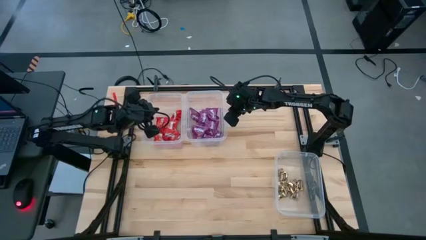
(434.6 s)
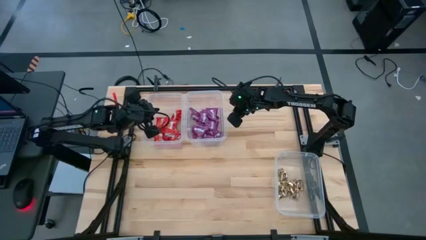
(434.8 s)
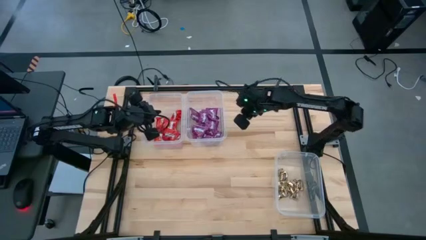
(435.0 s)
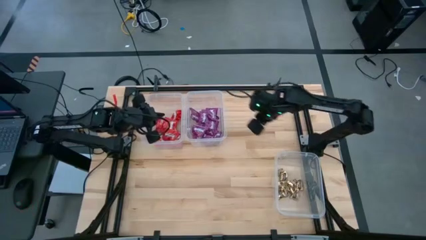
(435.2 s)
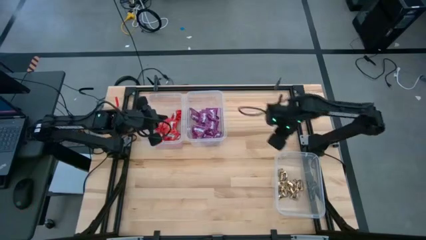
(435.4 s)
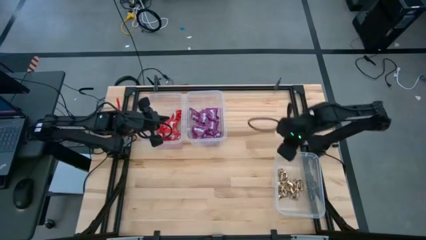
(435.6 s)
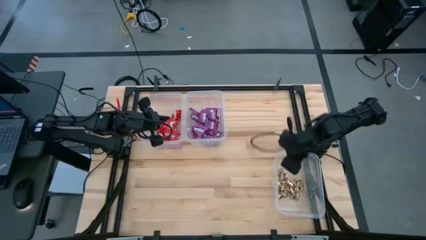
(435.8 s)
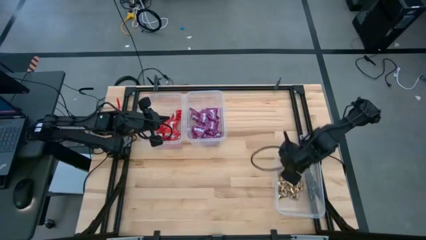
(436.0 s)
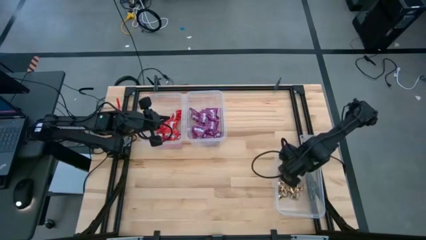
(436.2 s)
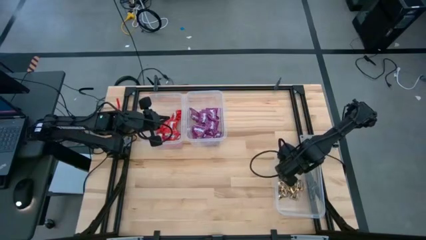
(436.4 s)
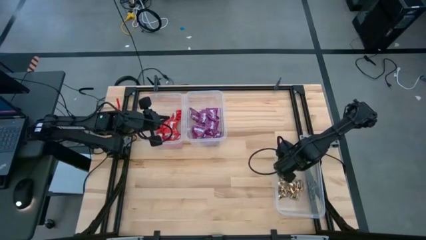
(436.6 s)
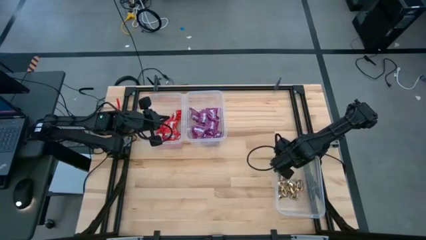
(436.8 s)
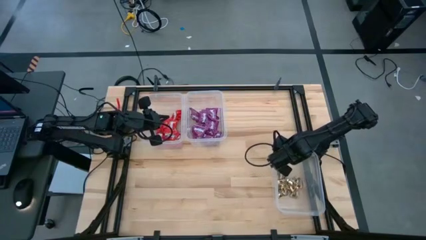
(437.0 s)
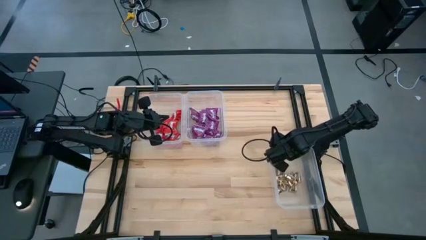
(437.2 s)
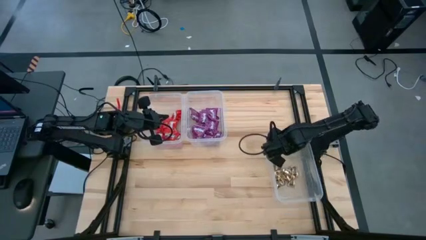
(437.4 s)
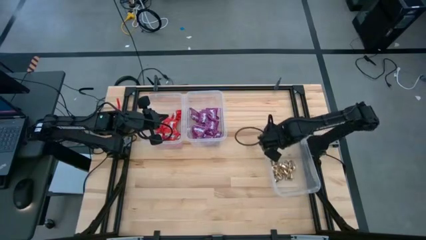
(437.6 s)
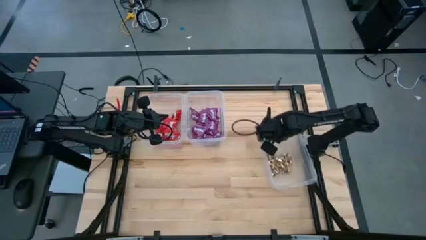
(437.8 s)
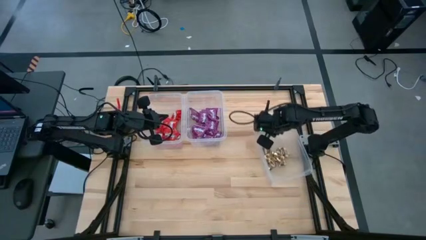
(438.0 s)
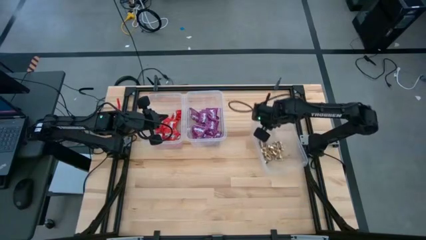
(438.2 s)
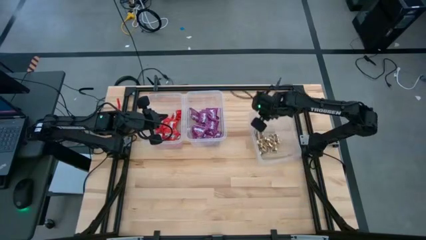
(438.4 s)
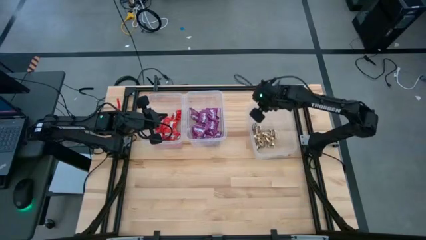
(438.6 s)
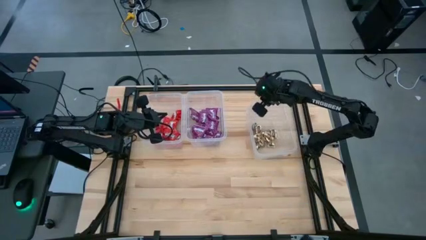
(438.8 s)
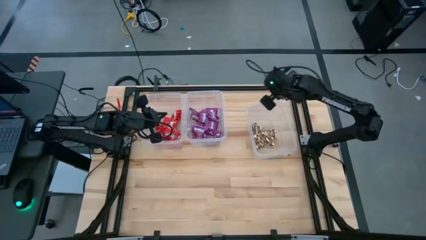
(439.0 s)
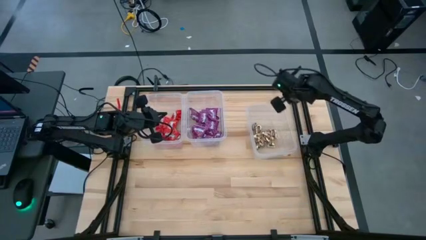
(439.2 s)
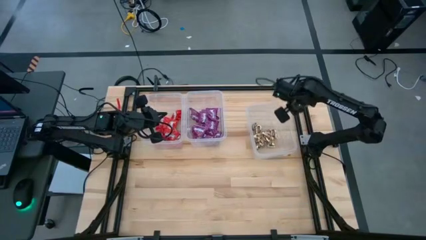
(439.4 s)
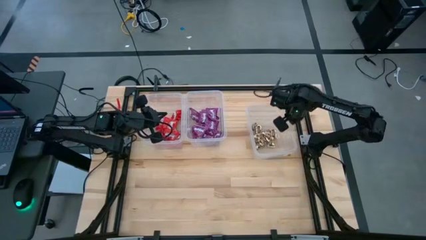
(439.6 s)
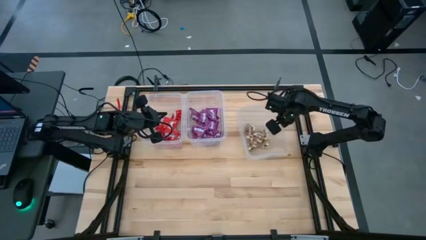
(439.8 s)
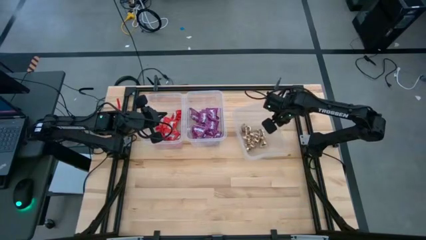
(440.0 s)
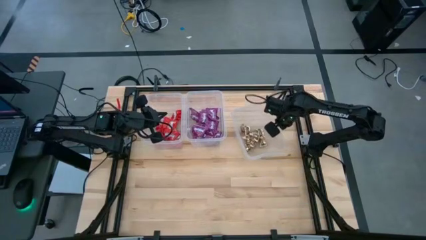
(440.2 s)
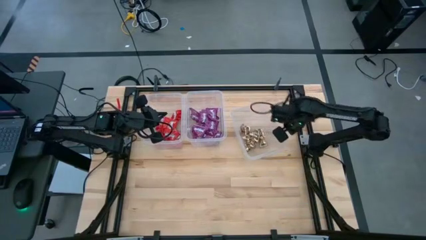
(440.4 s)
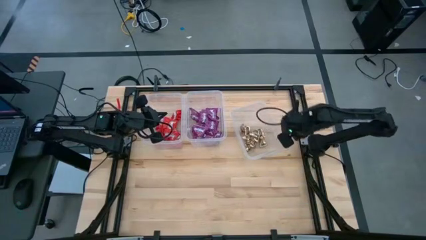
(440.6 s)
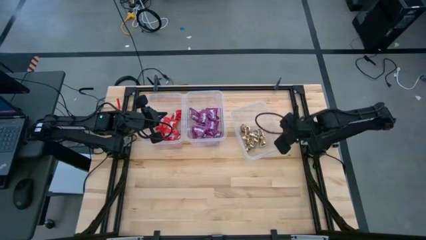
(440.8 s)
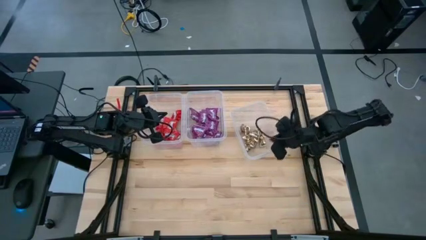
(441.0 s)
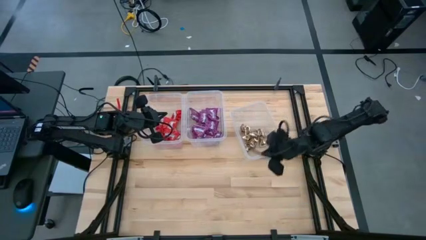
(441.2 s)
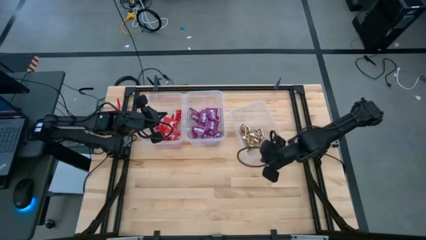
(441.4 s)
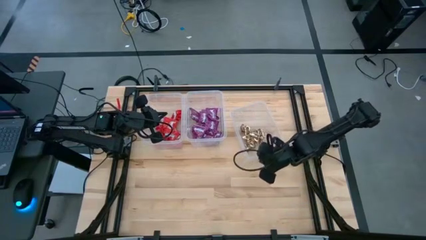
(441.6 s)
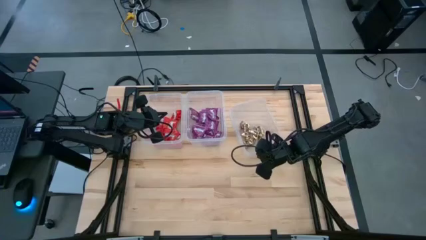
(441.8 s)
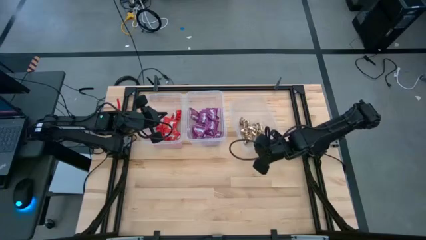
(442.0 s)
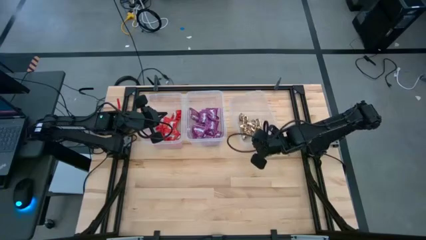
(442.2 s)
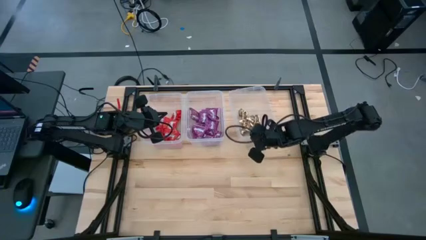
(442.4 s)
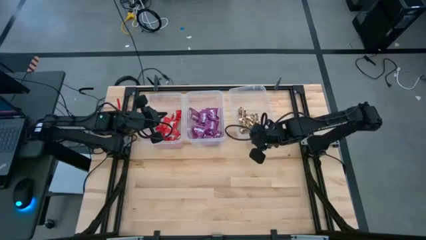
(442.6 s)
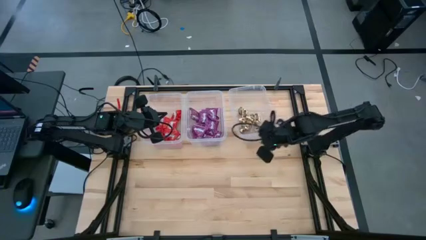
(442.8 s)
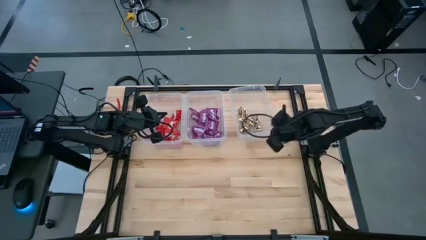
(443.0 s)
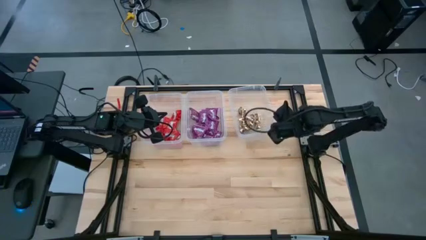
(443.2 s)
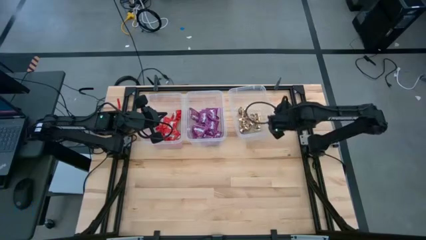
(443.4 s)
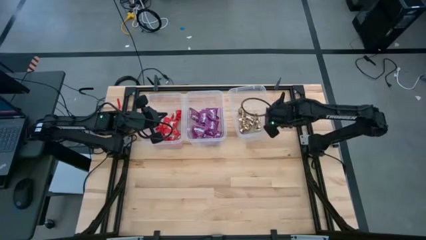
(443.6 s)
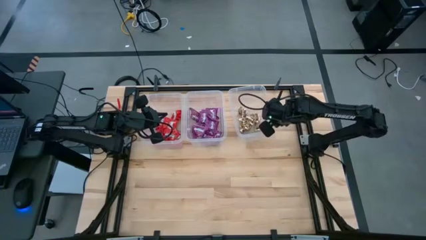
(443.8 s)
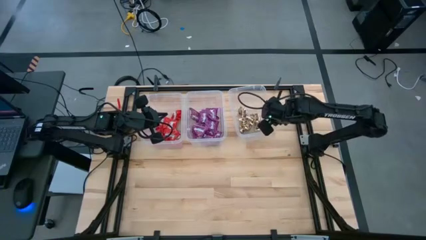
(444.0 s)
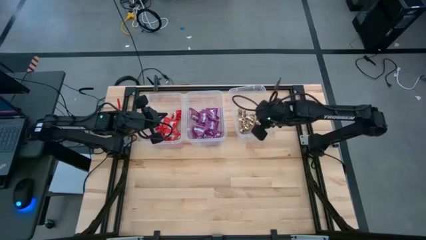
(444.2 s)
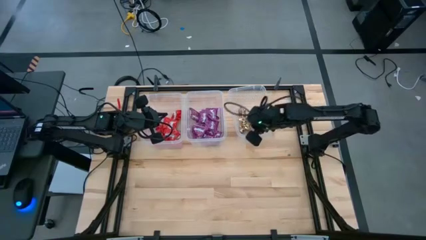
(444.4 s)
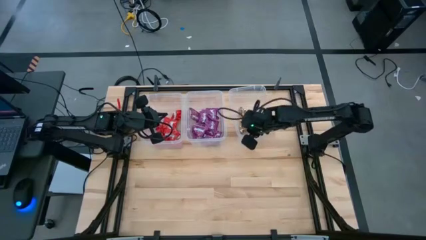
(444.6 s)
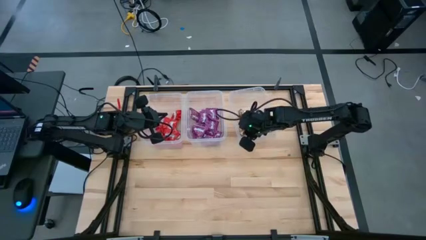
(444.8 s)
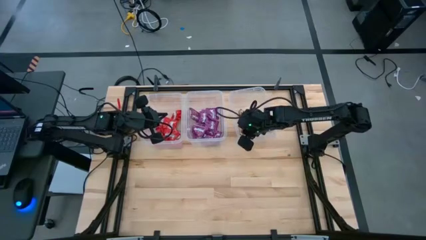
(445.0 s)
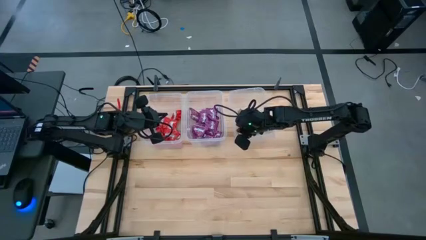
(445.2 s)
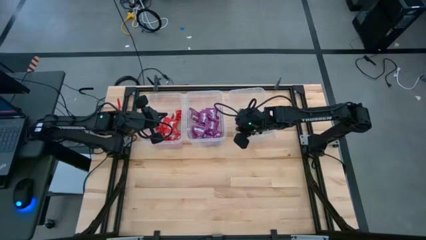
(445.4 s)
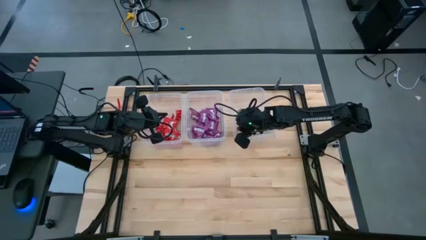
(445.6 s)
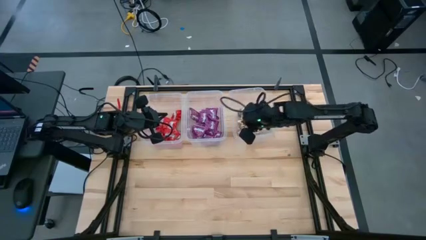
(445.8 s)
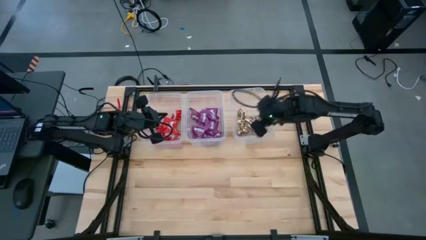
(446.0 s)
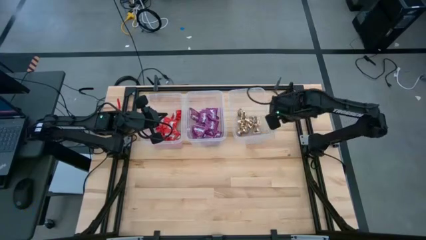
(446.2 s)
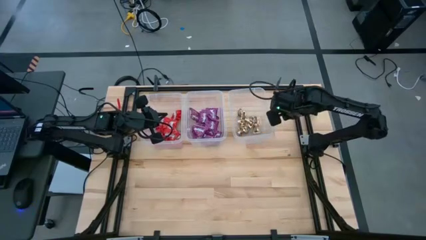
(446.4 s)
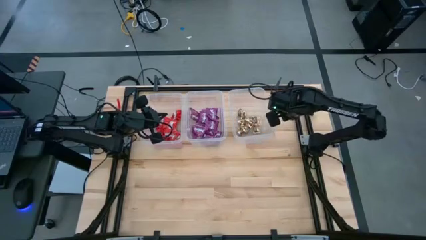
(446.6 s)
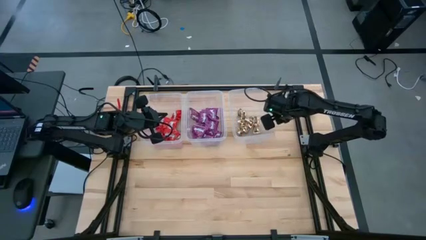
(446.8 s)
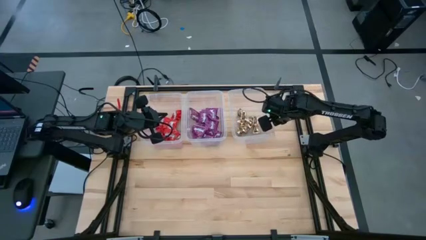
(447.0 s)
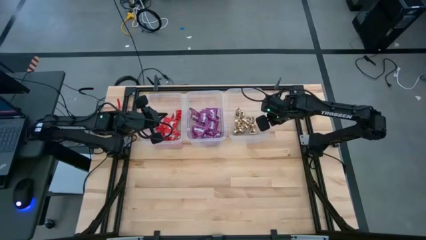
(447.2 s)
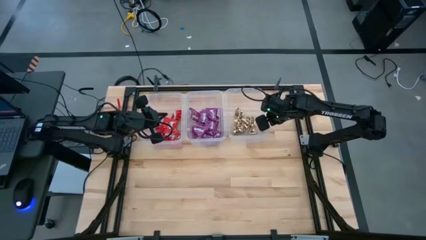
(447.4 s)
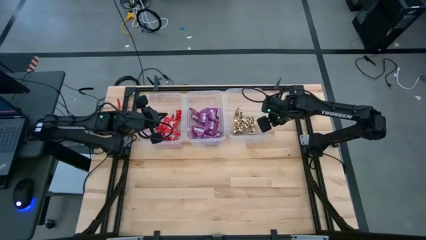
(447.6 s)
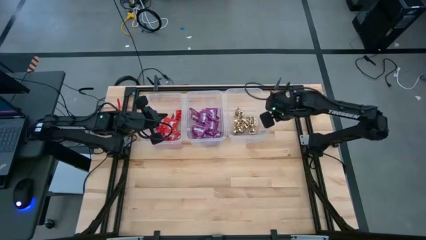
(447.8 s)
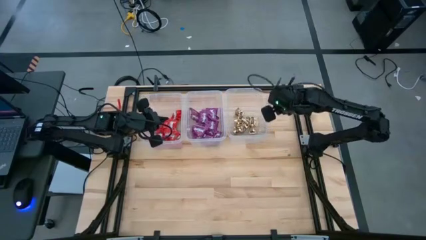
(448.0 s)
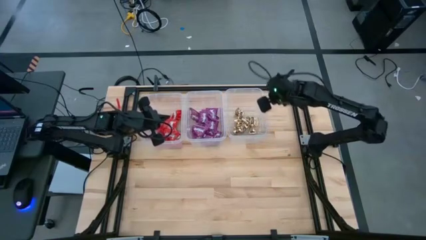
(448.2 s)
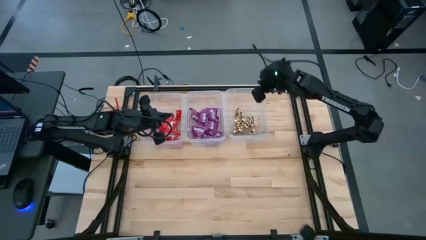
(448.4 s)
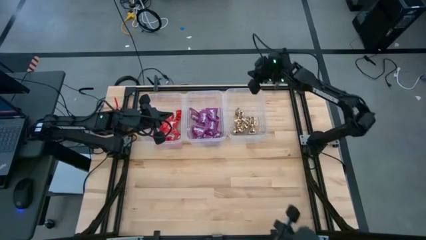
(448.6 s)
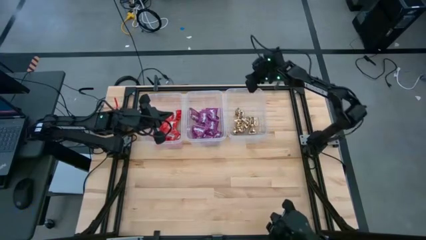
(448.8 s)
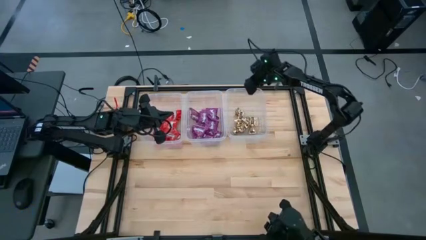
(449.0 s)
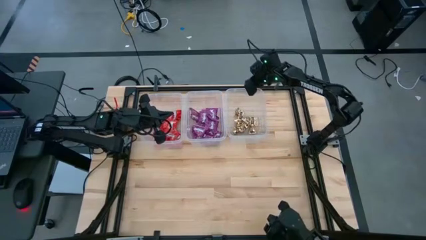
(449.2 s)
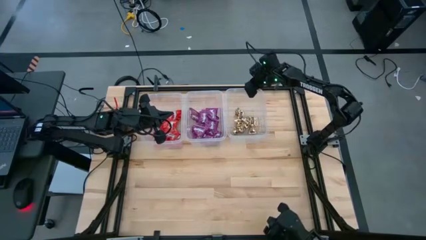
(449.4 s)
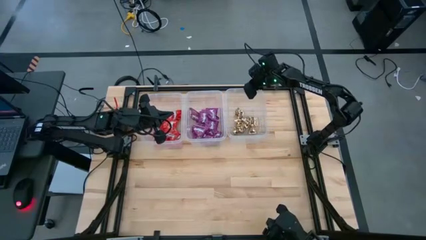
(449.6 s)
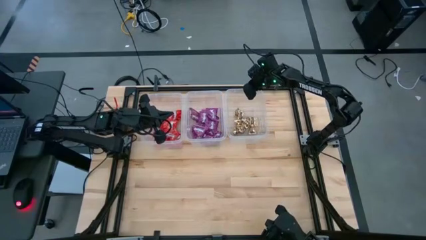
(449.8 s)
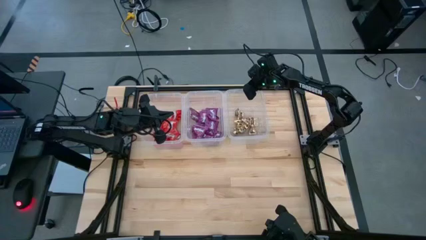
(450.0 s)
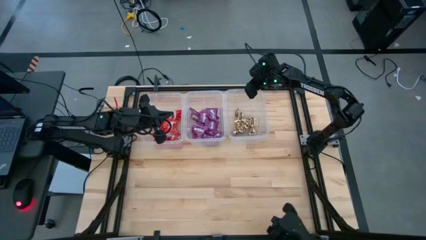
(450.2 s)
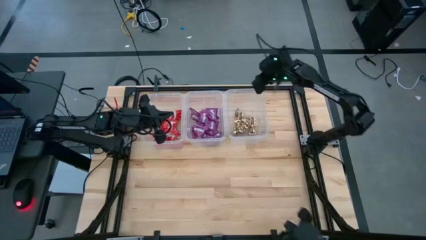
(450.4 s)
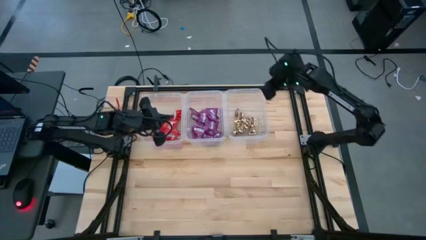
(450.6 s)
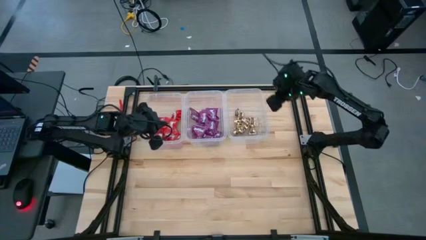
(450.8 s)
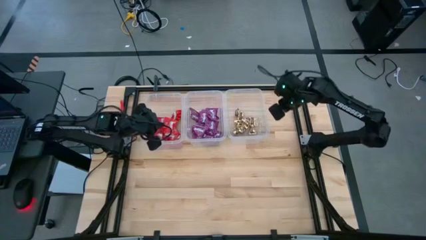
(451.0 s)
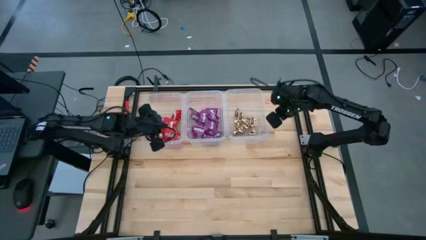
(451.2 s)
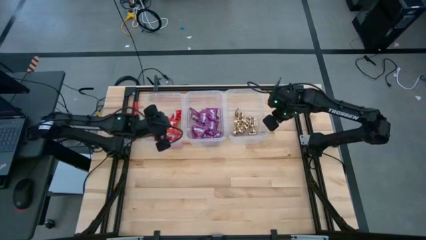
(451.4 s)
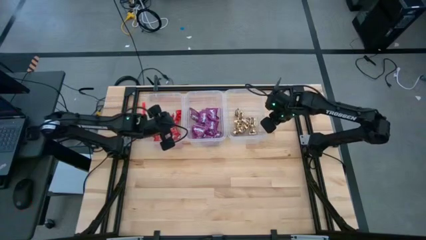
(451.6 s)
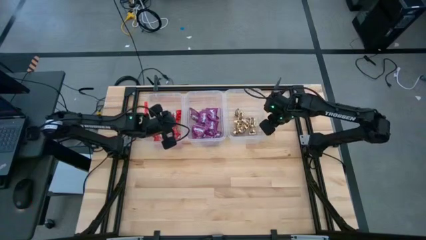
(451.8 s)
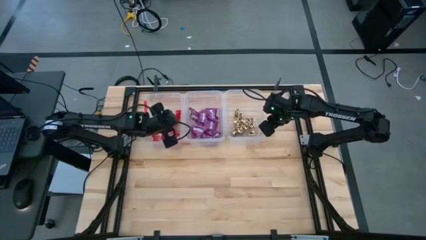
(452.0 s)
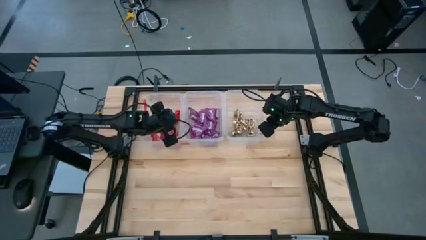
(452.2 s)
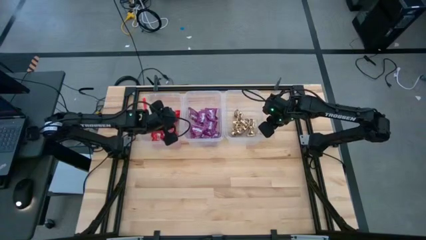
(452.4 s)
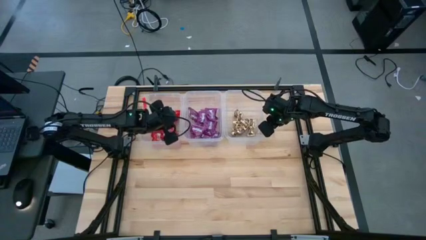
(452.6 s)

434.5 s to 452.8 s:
Task: Sort candy
Move the bottom right transparent bin to the right of the top center transparent bin
